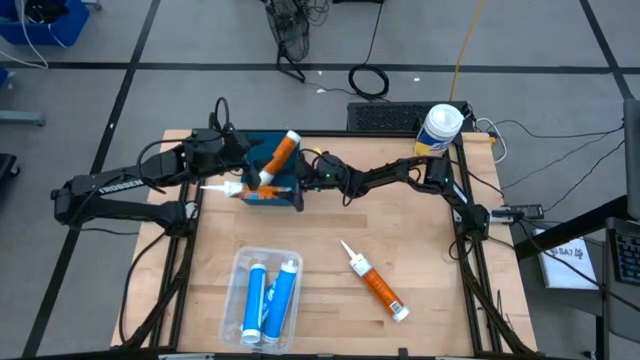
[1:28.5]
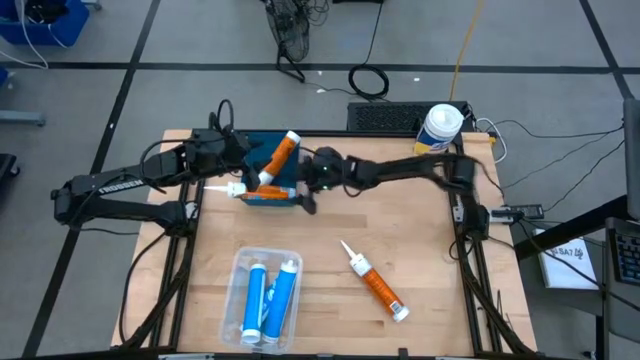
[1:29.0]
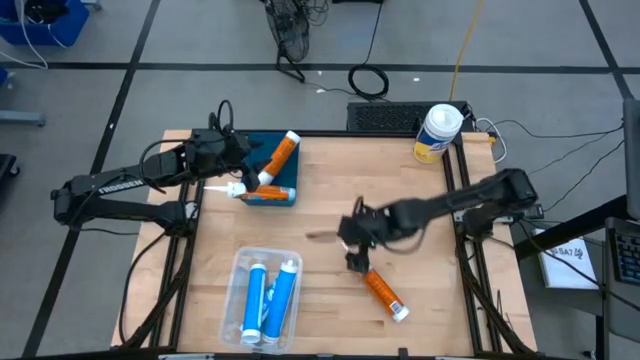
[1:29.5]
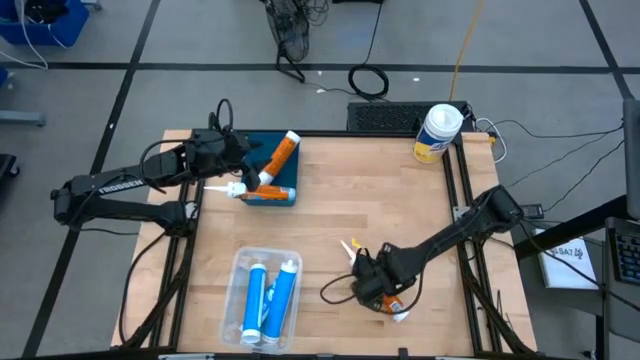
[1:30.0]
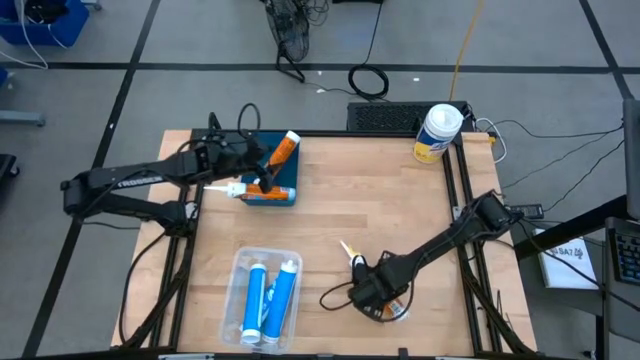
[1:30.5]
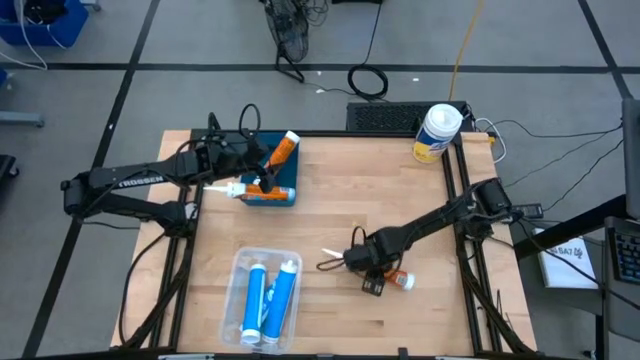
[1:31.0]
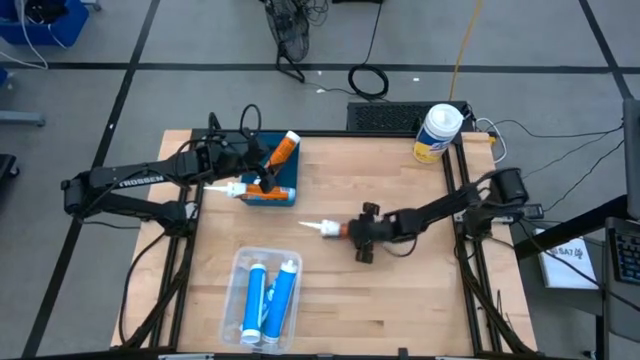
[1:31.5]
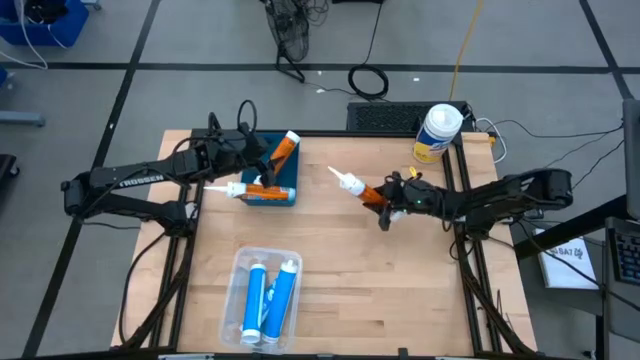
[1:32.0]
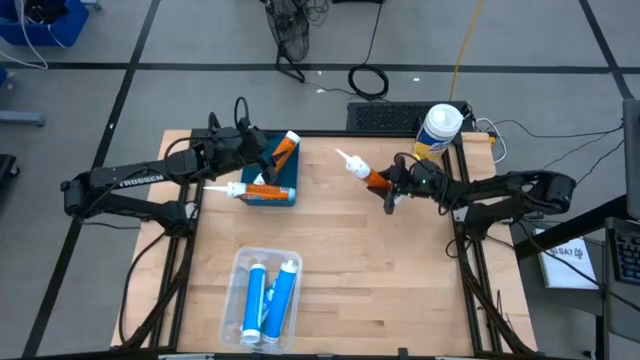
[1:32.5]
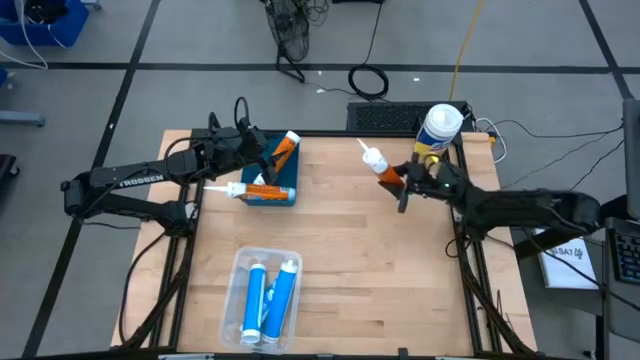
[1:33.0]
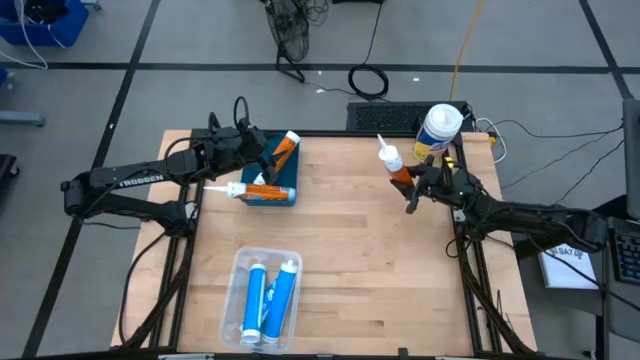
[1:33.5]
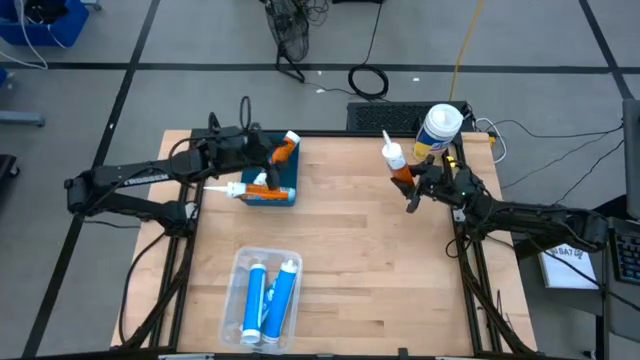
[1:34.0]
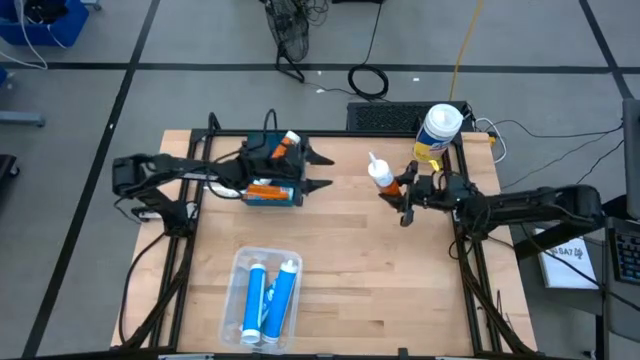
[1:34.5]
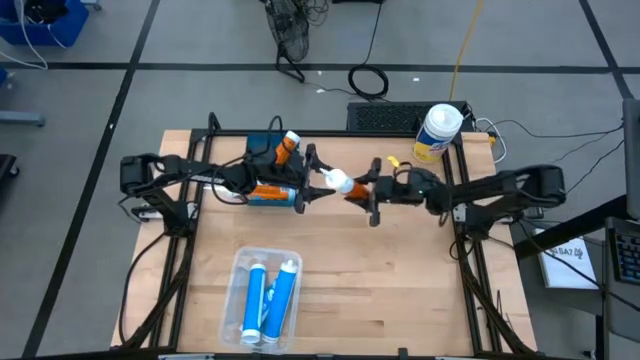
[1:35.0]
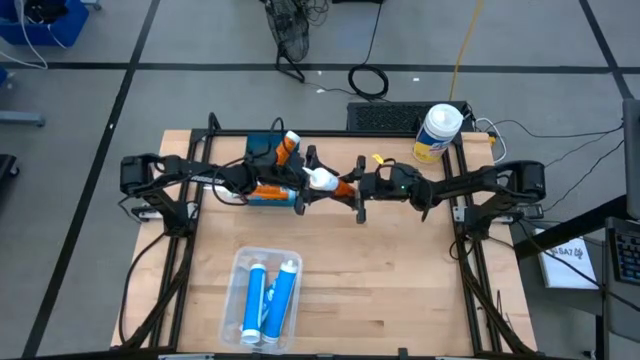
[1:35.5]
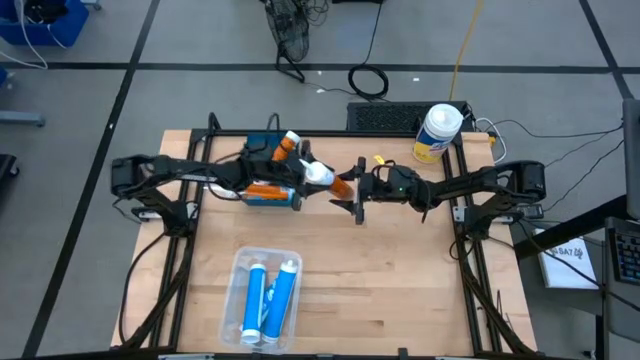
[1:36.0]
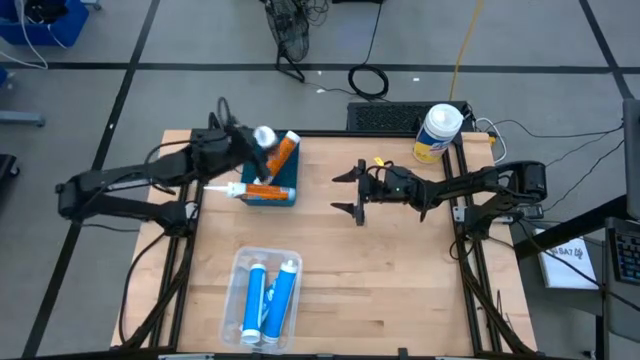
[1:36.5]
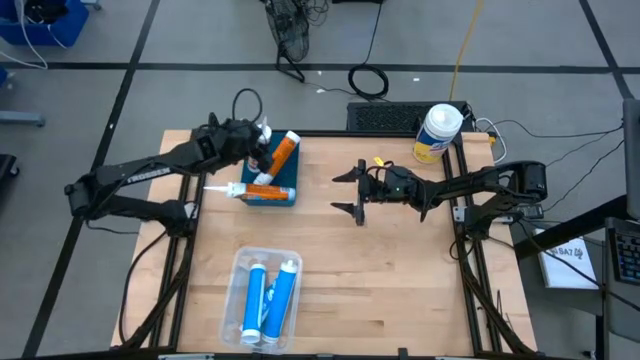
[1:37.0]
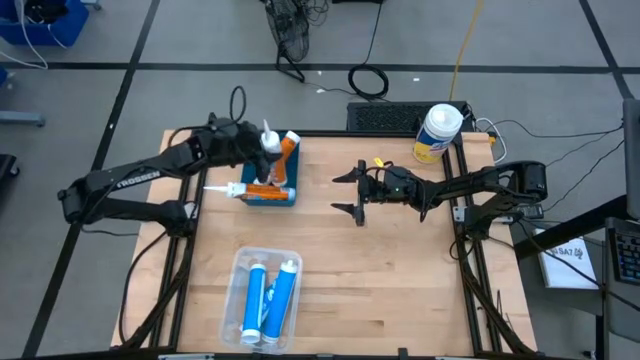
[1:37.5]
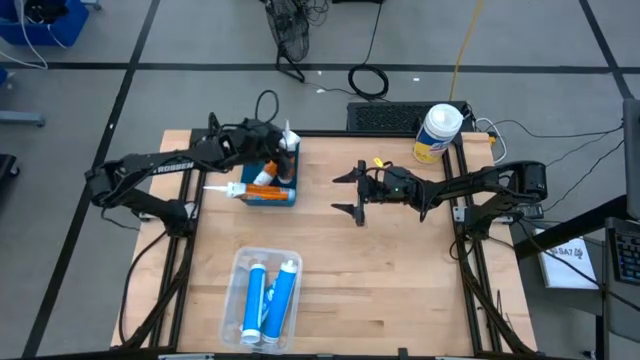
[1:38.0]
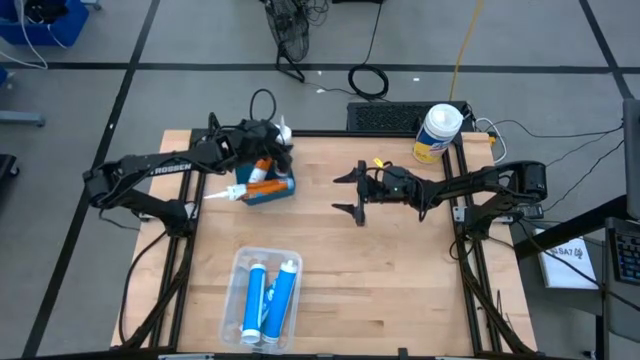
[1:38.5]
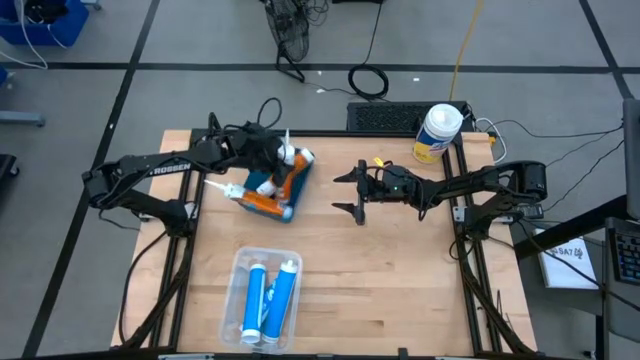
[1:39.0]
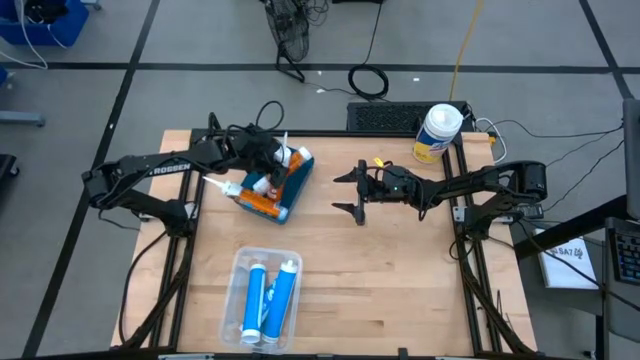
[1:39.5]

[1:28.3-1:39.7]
Task: Pick & place silicon tubes, Sealant and Lysol wipes
Put the orange sealant into the blue bin

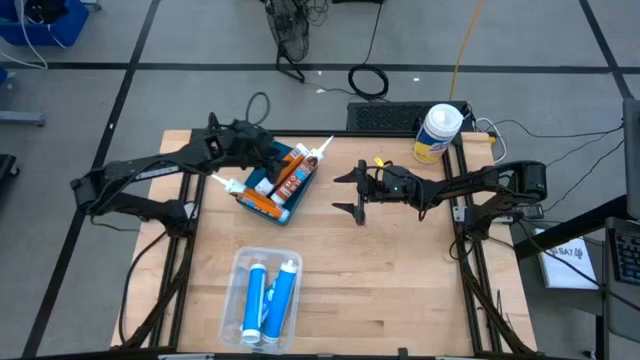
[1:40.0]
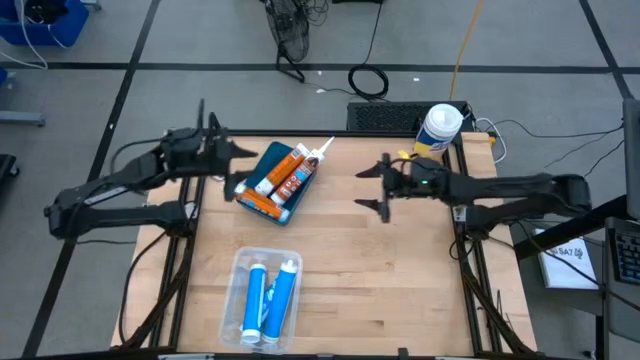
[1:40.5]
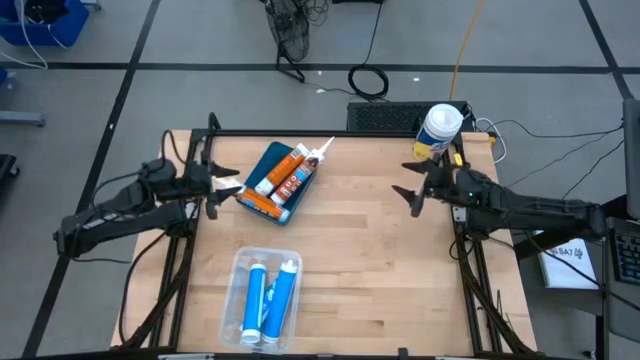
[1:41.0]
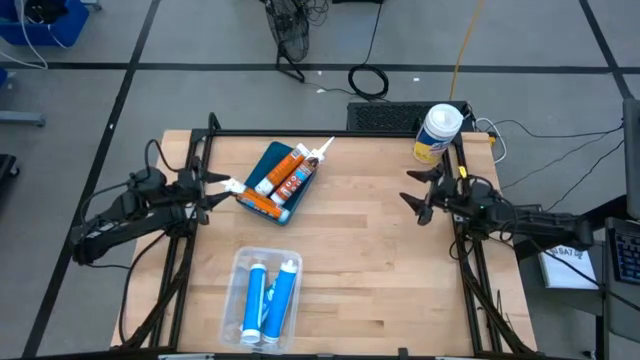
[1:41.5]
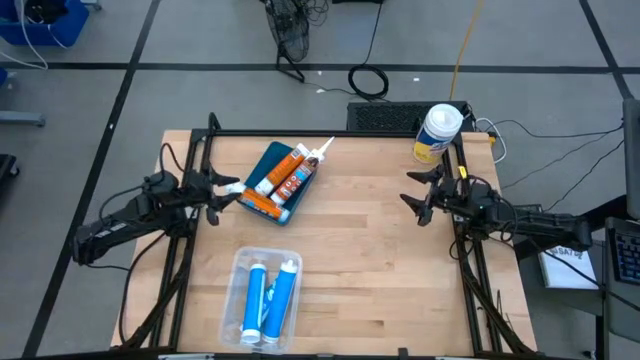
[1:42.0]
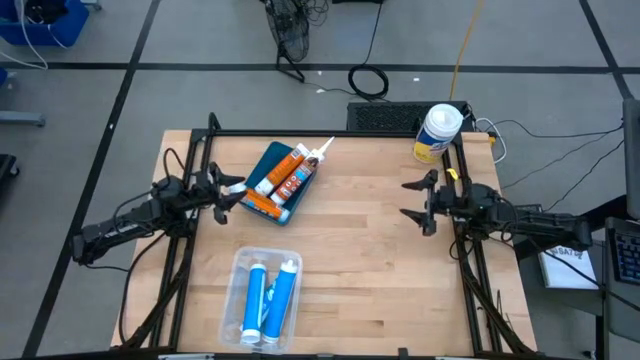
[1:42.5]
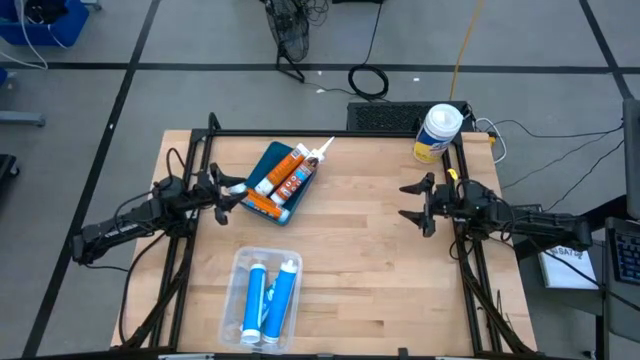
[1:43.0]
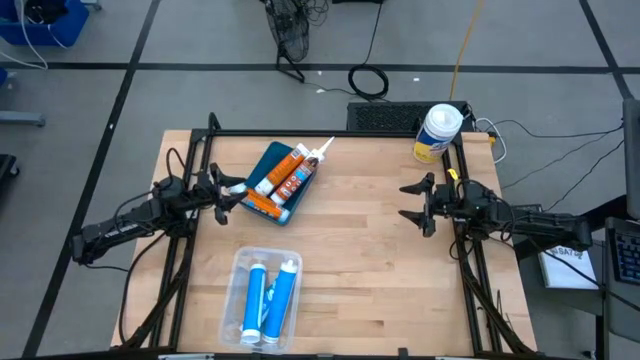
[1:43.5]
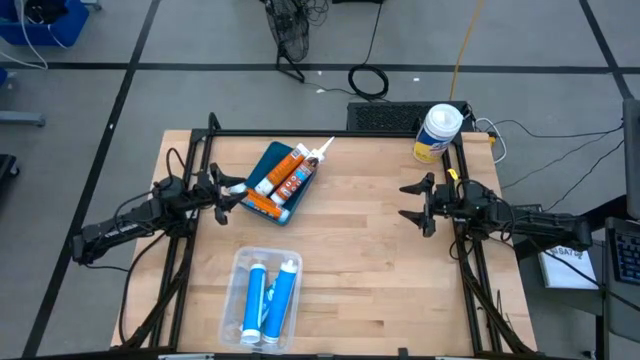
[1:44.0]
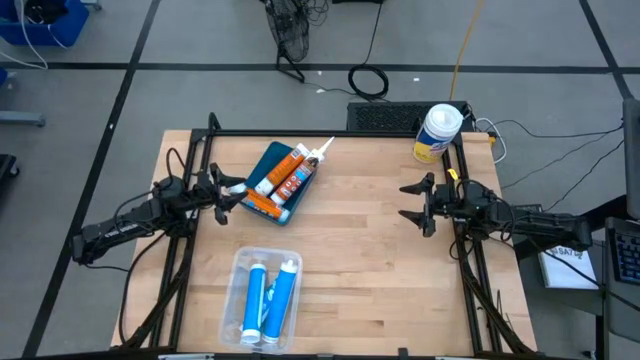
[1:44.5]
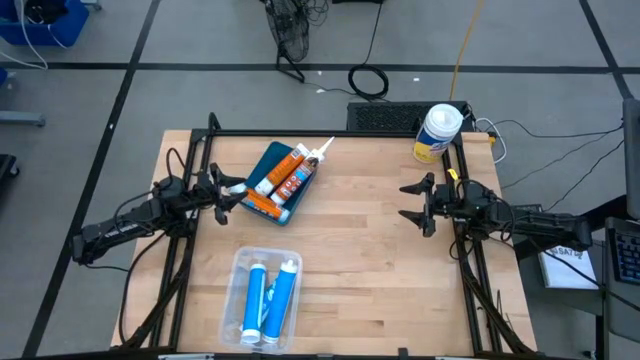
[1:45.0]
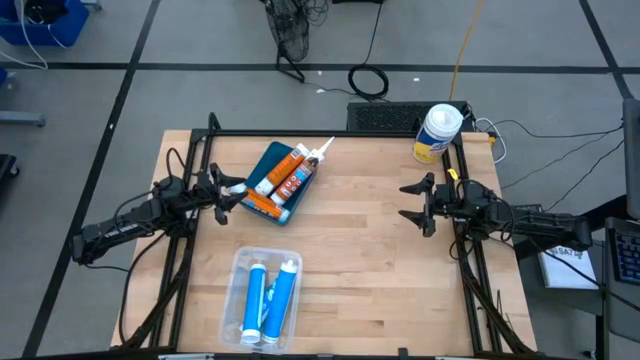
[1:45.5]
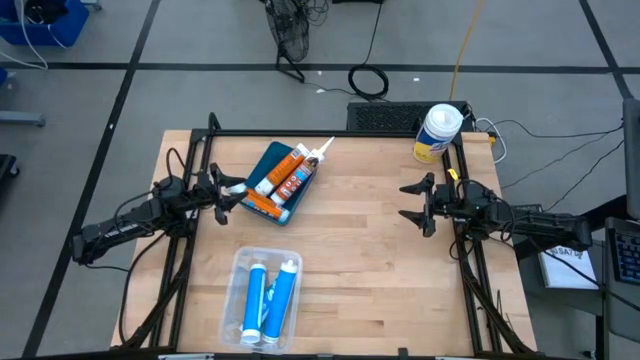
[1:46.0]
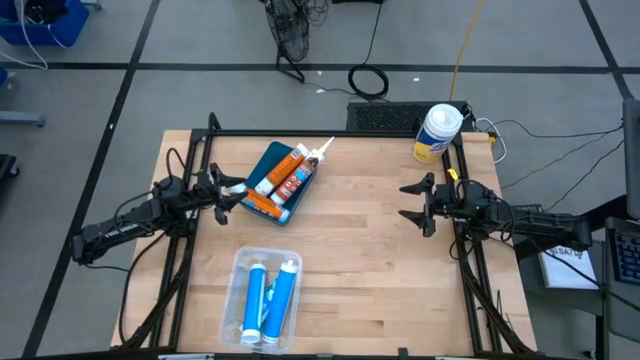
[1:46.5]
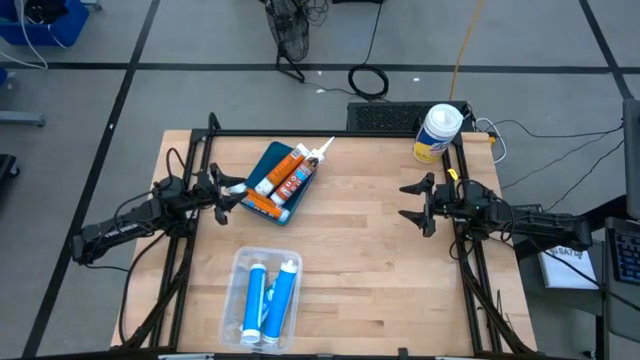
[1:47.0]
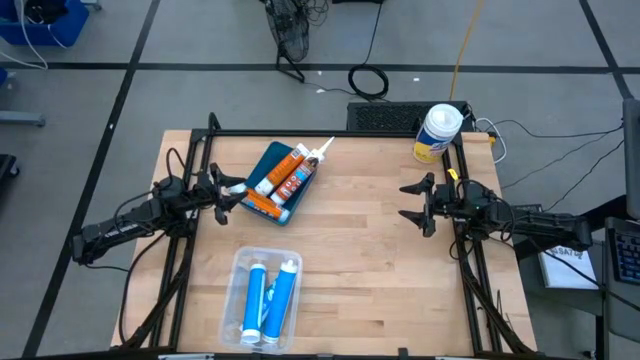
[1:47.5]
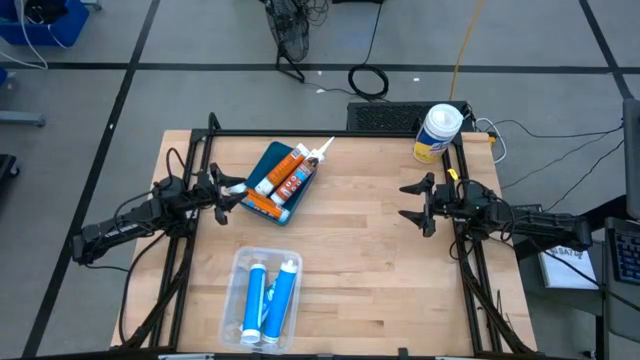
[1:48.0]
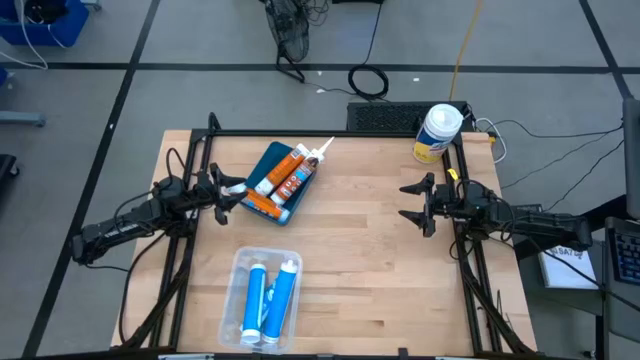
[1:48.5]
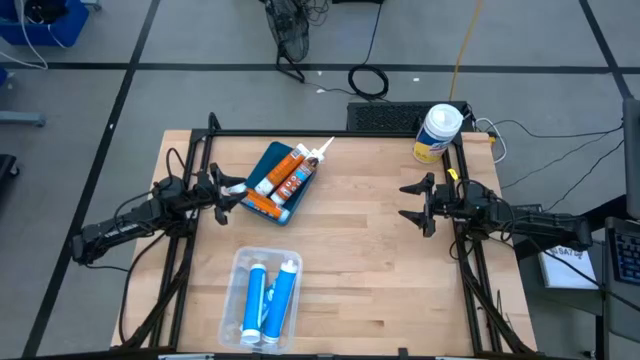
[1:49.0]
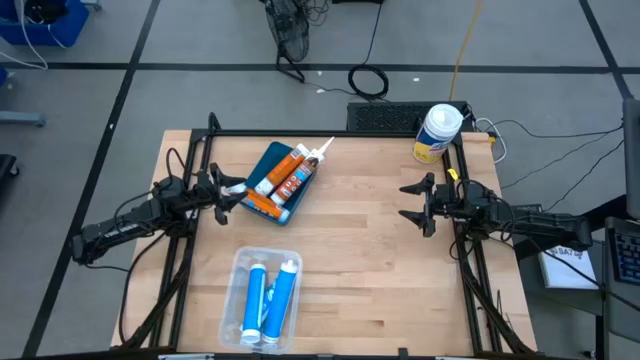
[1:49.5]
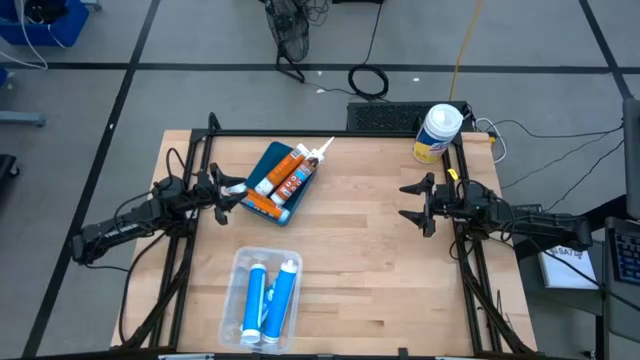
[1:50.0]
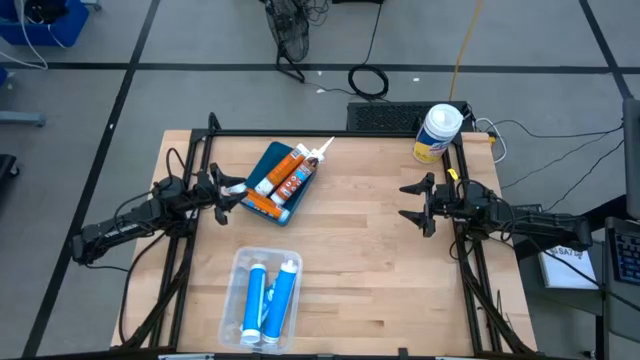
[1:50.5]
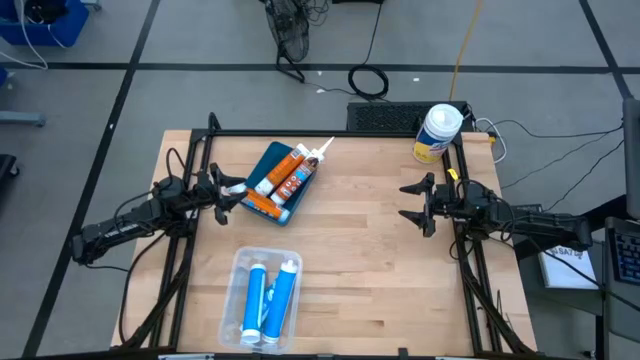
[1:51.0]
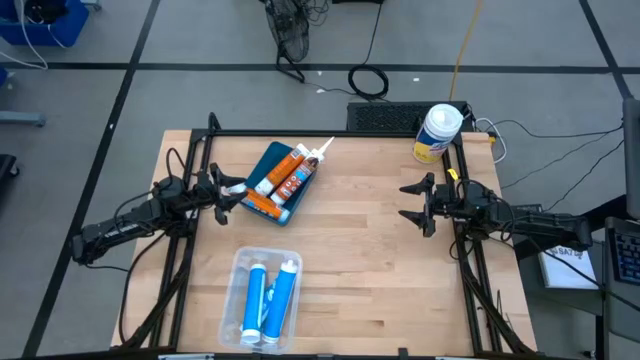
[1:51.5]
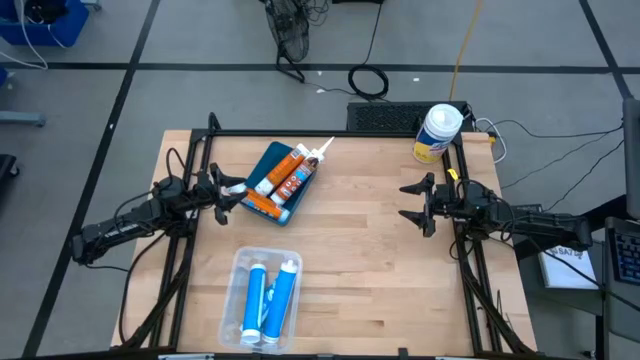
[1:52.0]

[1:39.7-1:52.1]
Return to Home Position
